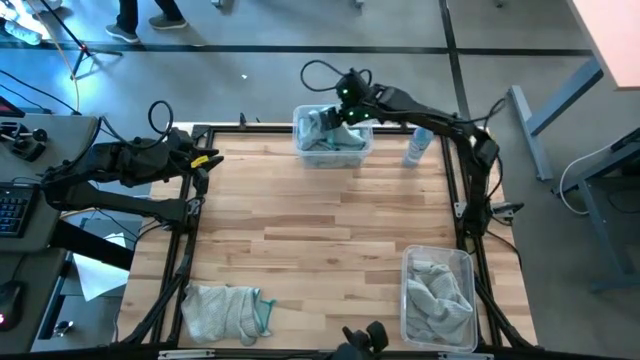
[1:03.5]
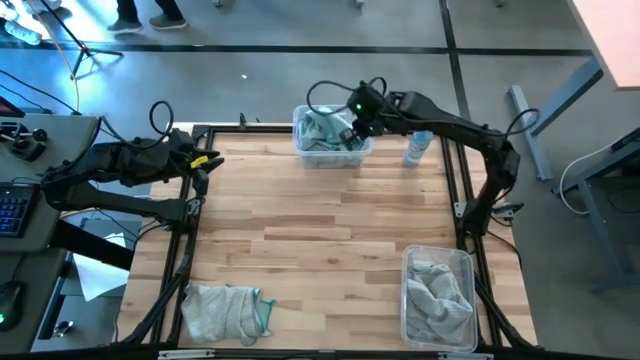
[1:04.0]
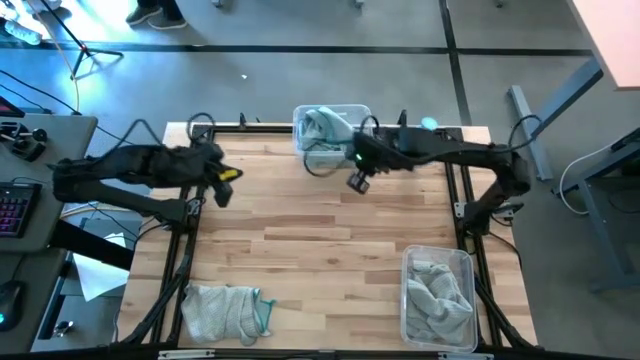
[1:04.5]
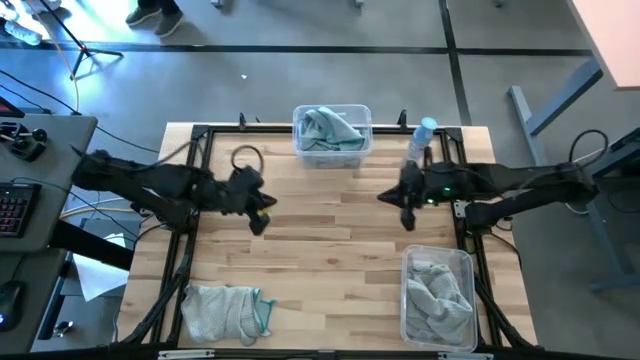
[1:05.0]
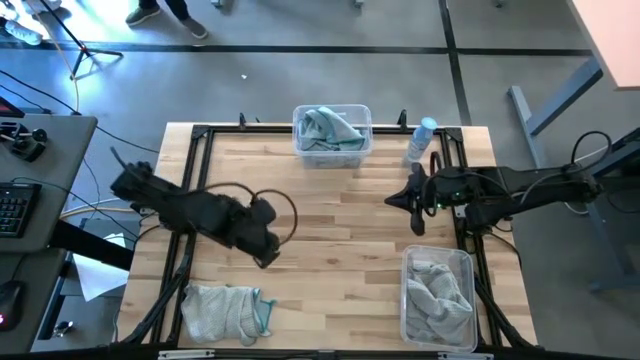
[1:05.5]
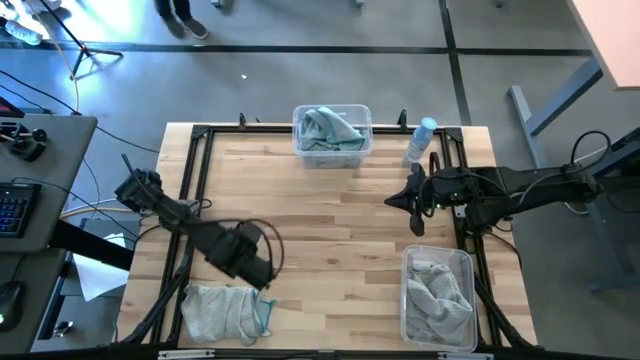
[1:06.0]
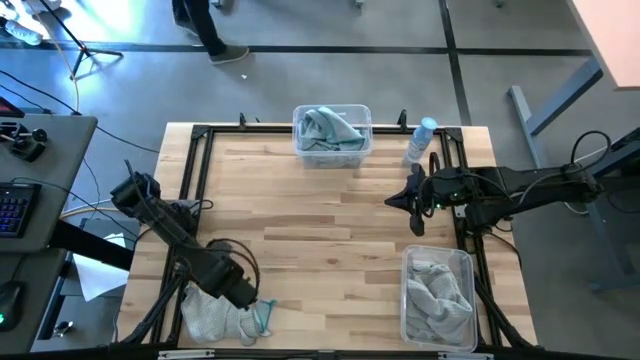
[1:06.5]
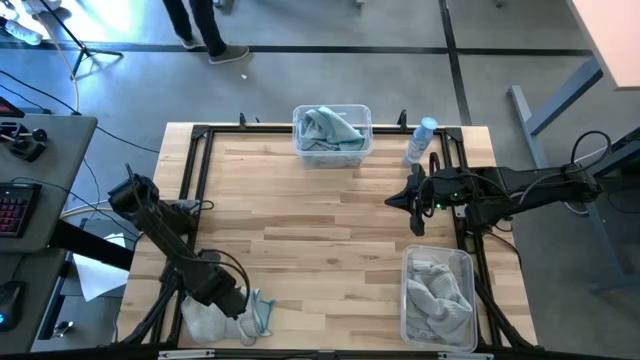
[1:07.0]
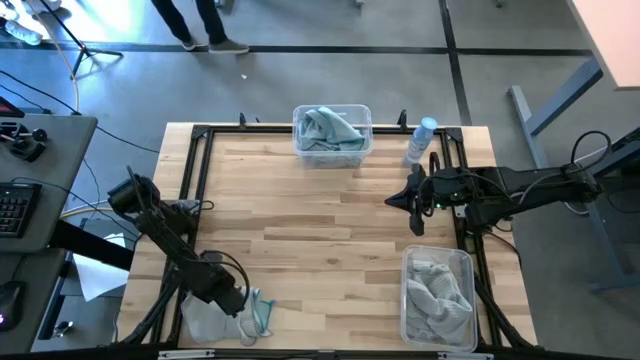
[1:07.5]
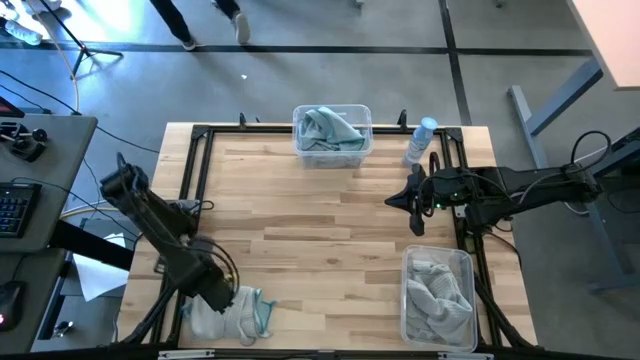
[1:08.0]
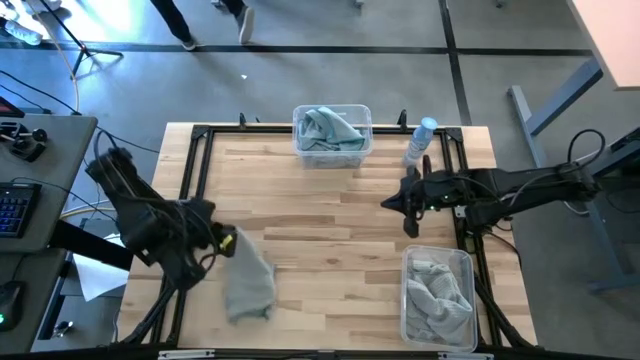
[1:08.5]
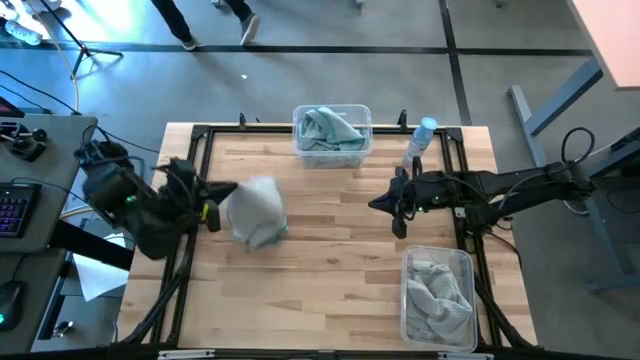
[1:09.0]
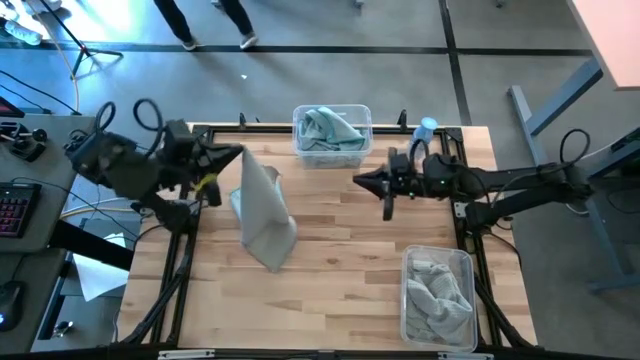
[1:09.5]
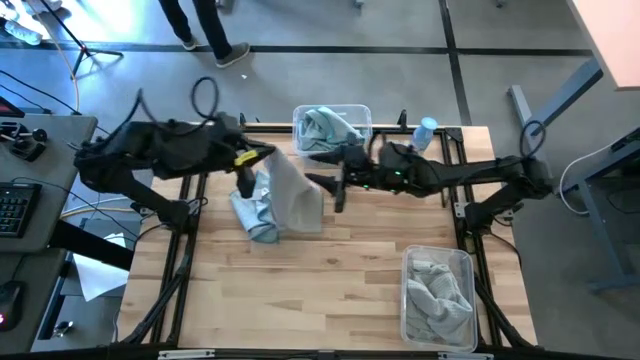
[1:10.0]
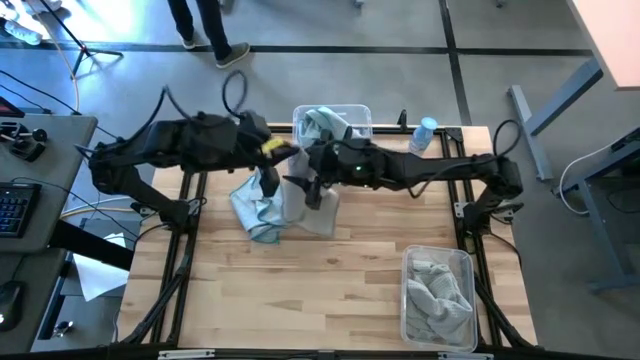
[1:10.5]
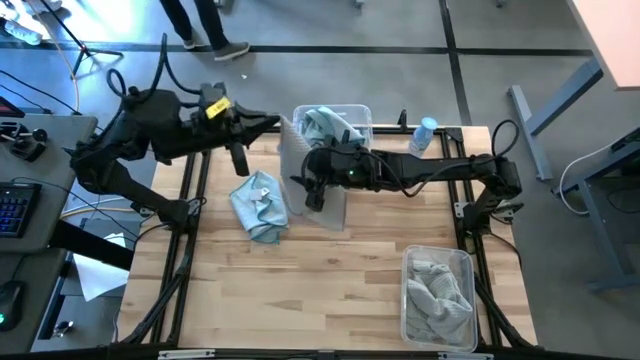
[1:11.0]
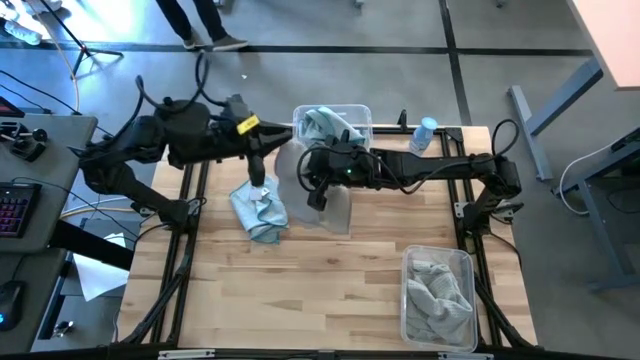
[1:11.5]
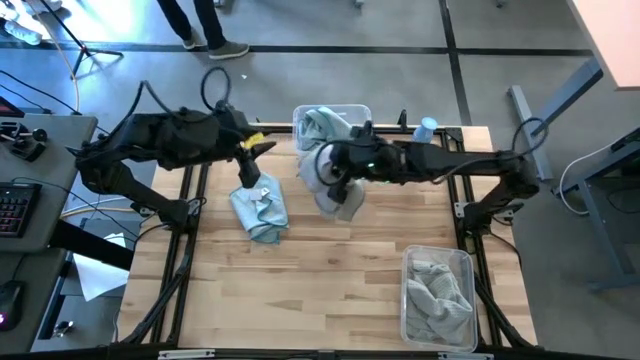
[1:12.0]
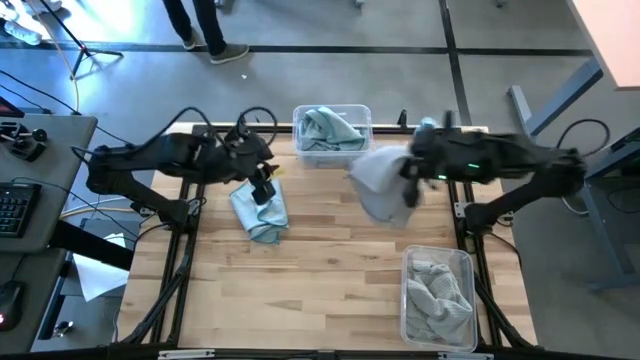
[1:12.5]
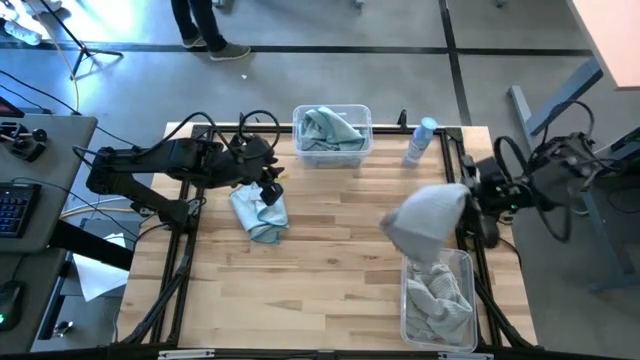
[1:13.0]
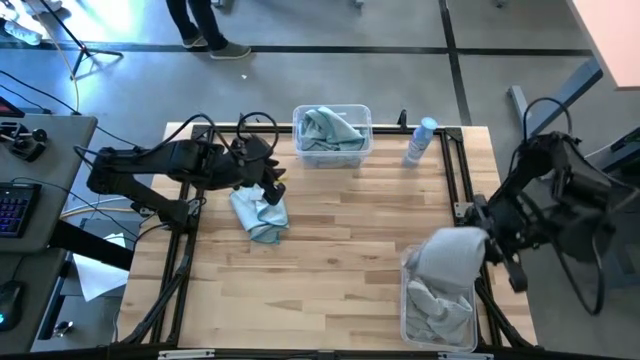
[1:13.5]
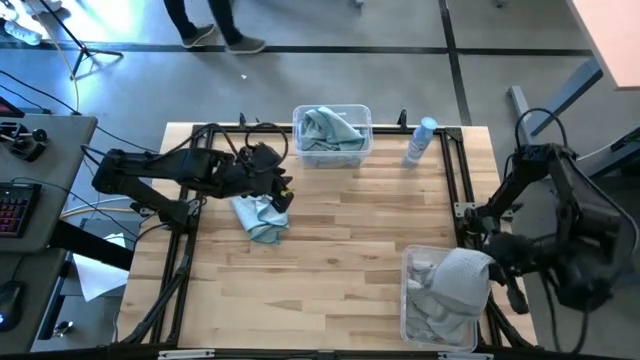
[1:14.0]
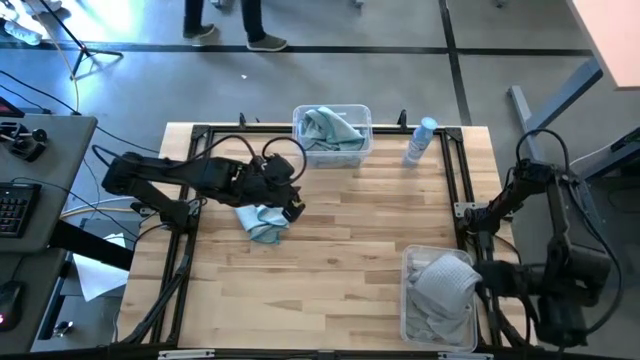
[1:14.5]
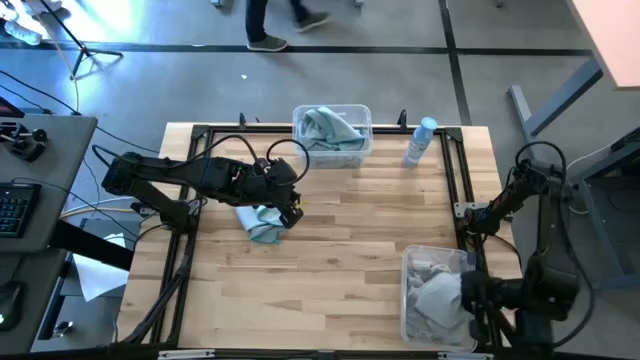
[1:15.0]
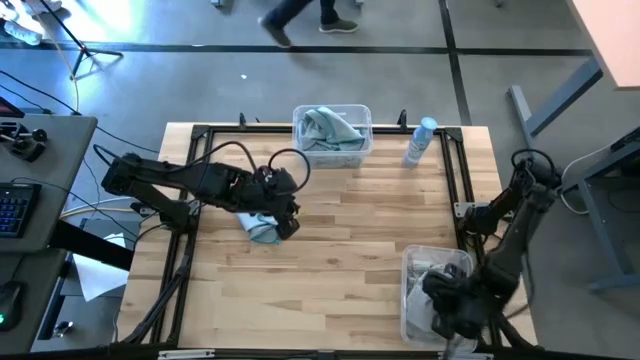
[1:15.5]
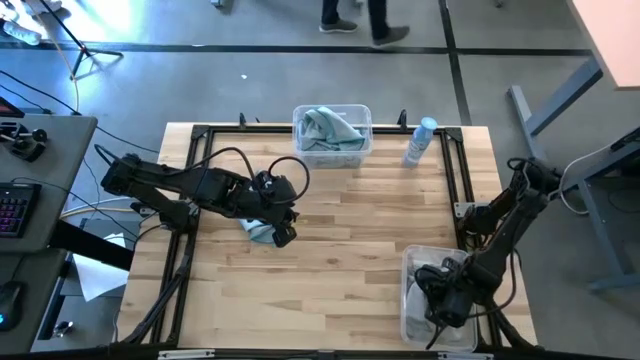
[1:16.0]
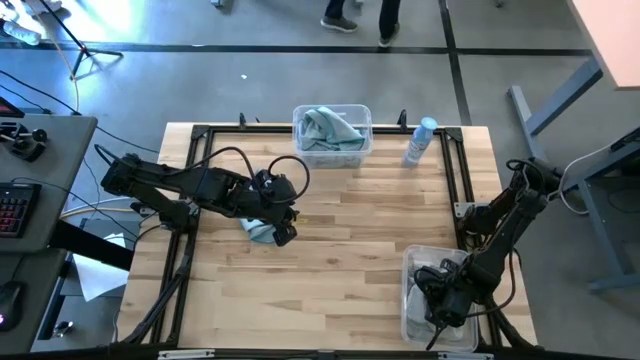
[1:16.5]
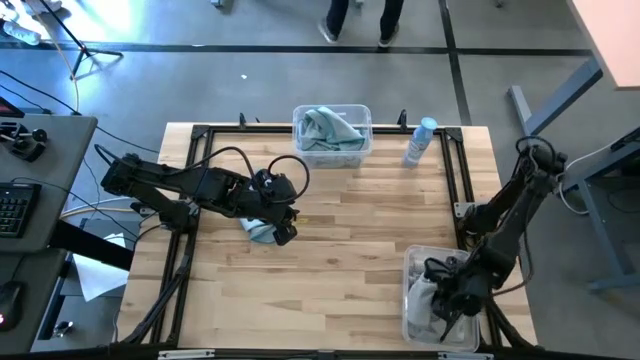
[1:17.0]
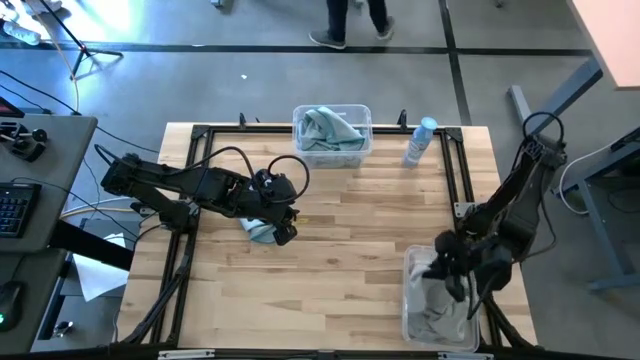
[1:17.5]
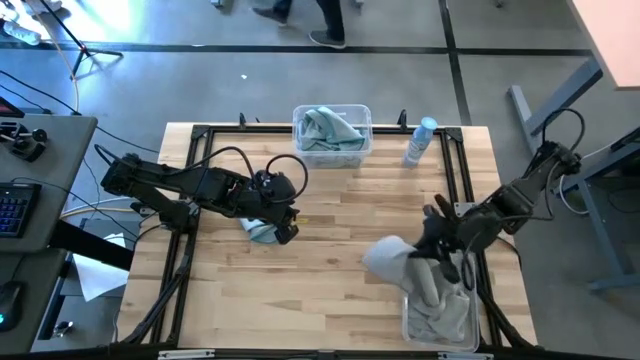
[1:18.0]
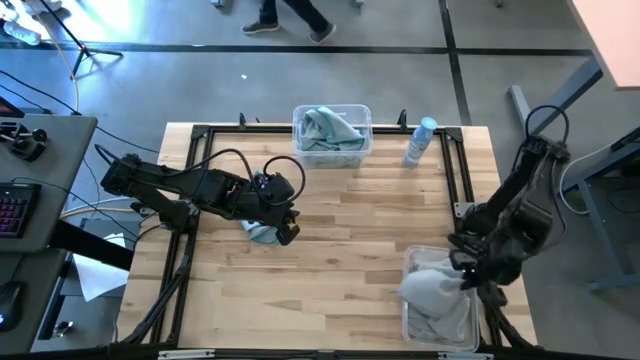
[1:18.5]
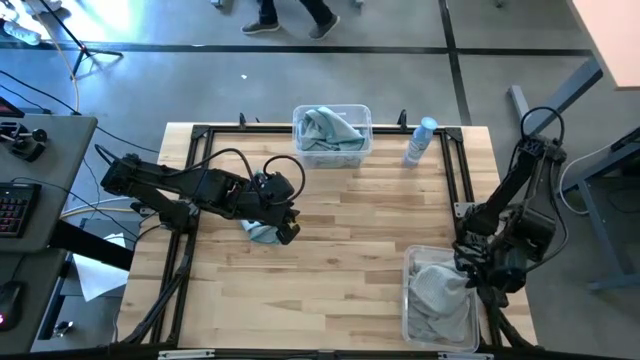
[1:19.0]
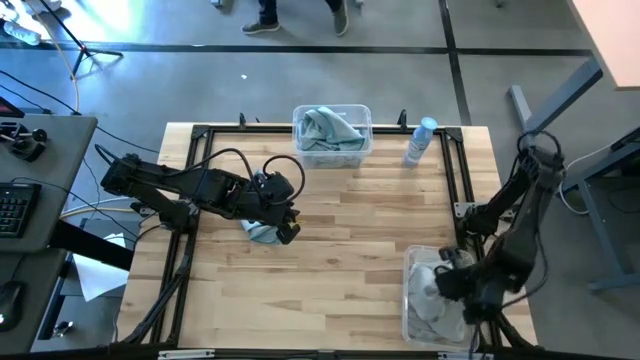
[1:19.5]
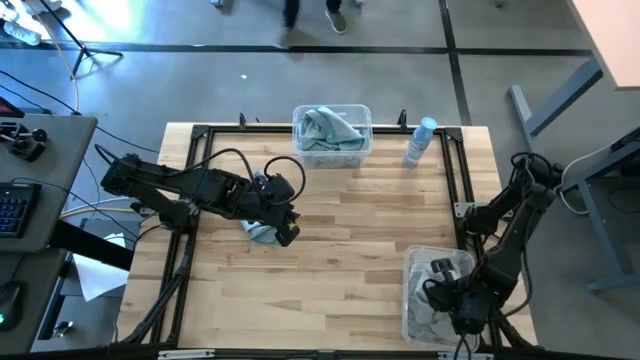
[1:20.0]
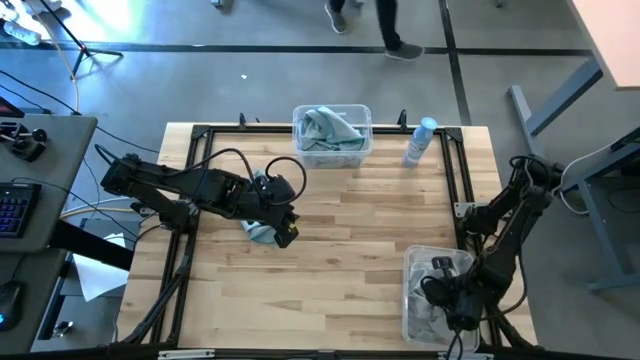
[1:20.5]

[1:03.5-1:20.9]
Task: Sort microfiber towel by color & place in baskets
Put the gray microfiber towel into the bottom transparent bin

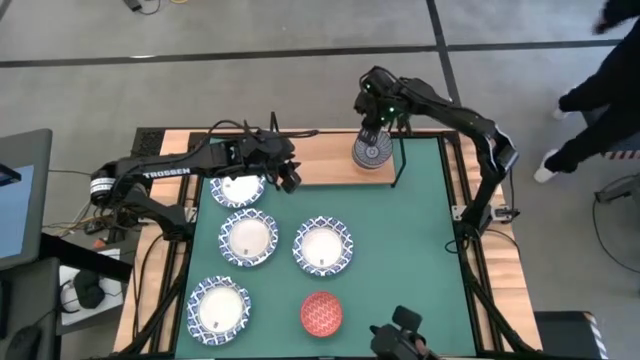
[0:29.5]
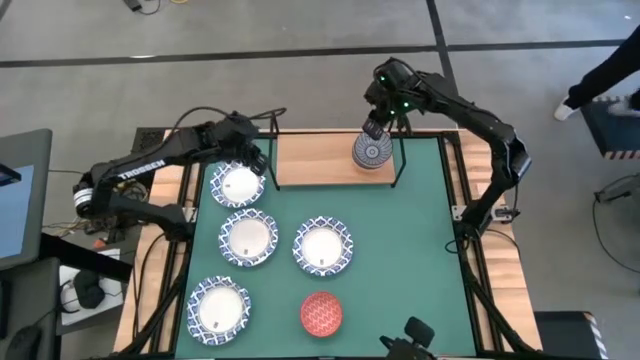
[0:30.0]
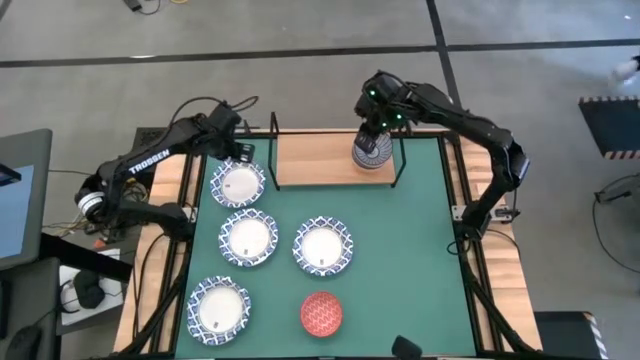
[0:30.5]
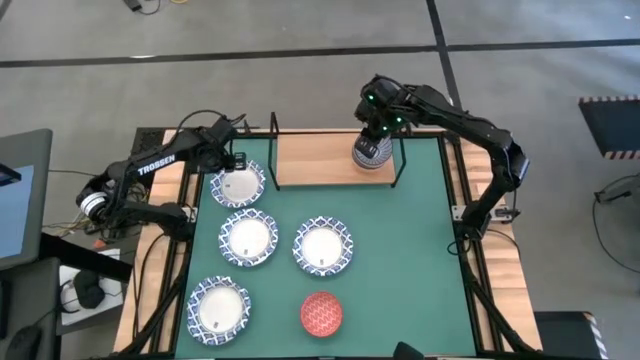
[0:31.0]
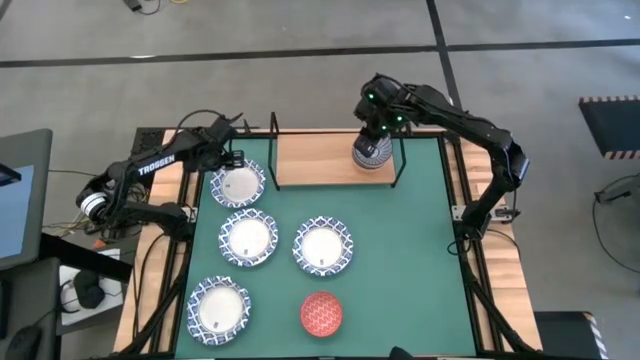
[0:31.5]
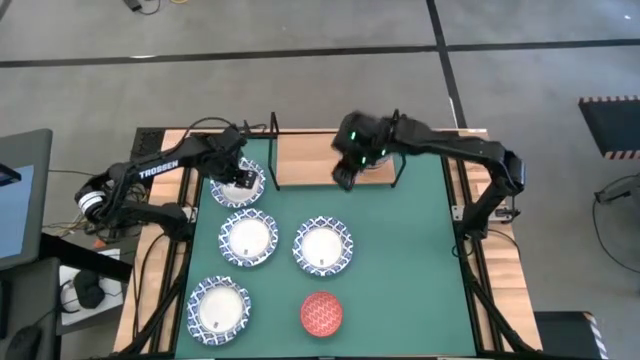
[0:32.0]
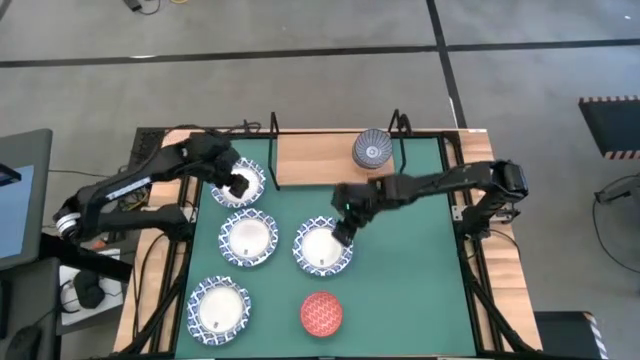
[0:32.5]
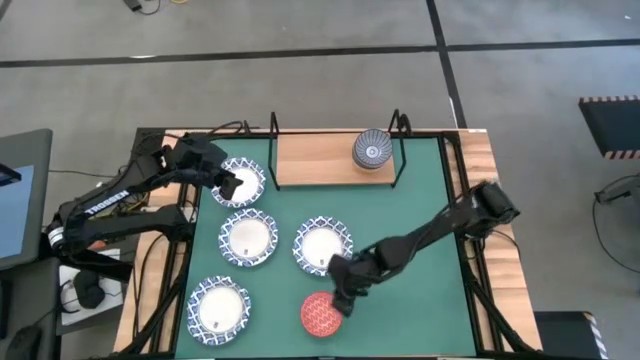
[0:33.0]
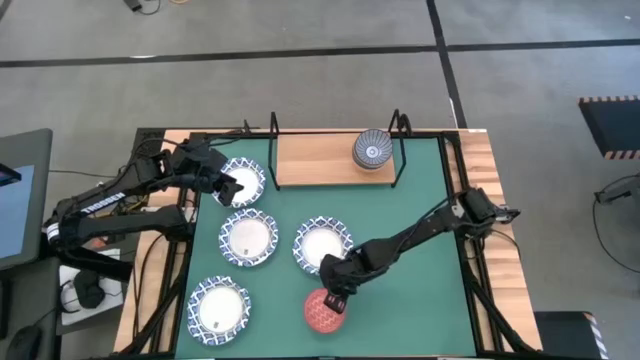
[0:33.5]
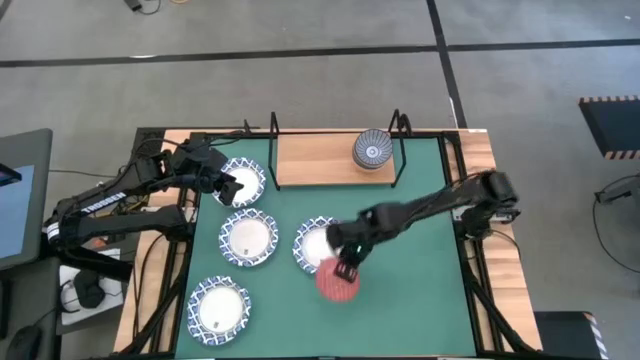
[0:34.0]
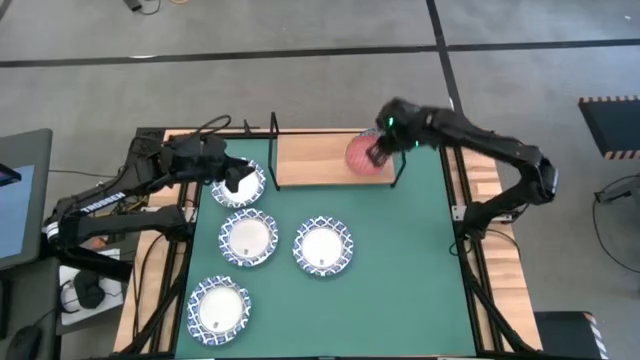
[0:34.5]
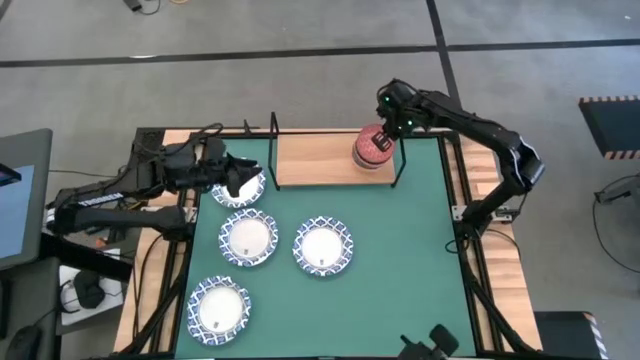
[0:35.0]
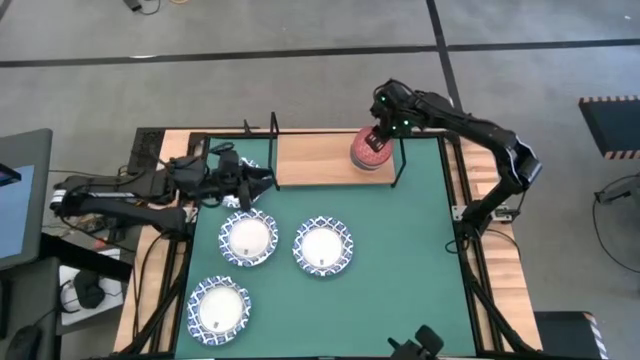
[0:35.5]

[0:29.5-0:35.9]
Task: Place and stack bowls onto a shelf
Stack the red ceramic bowl on top of the dark blue ceramic bowl on the shelf
